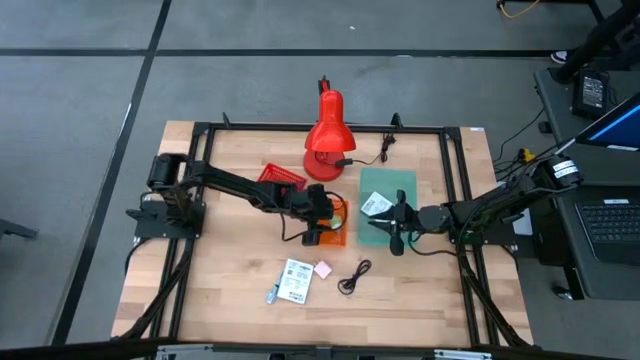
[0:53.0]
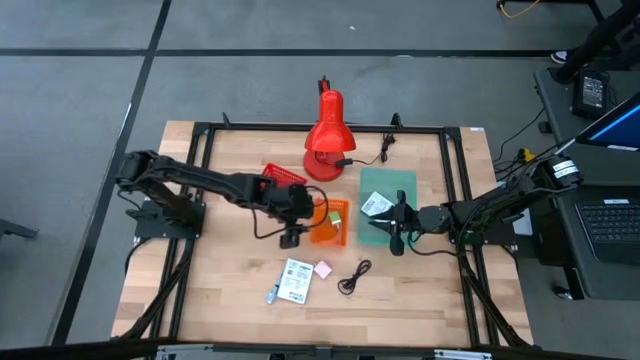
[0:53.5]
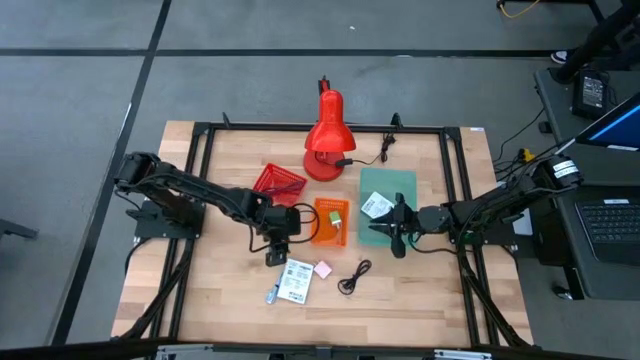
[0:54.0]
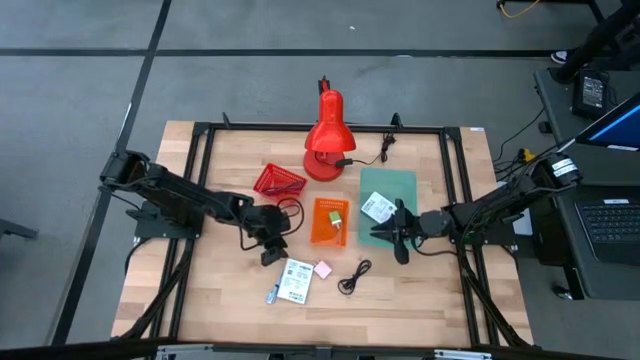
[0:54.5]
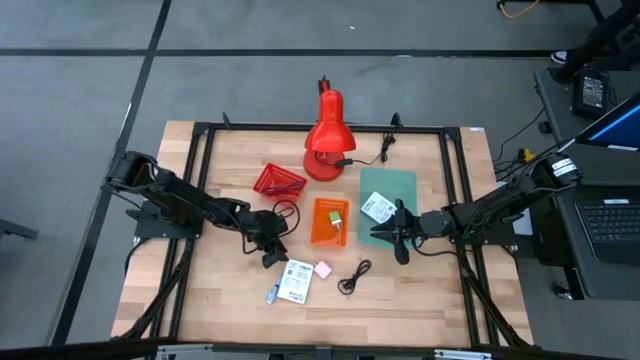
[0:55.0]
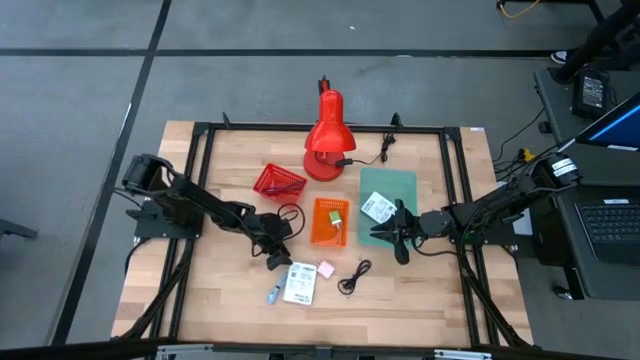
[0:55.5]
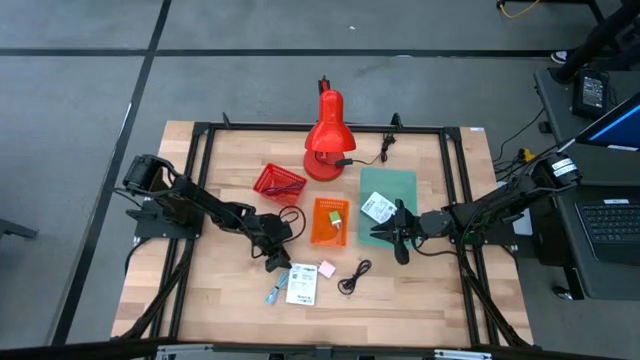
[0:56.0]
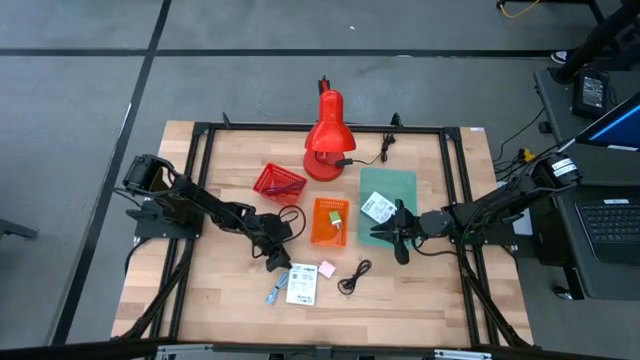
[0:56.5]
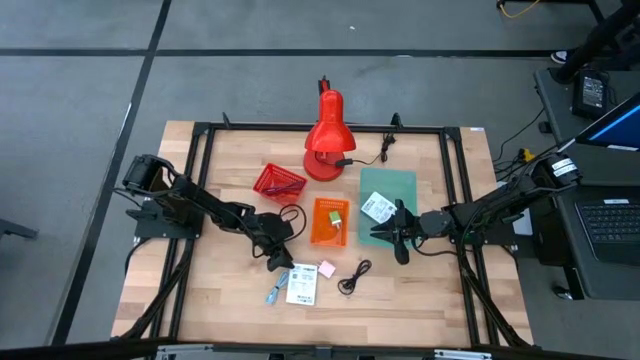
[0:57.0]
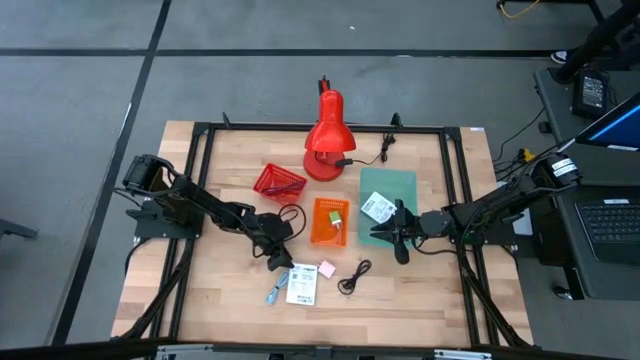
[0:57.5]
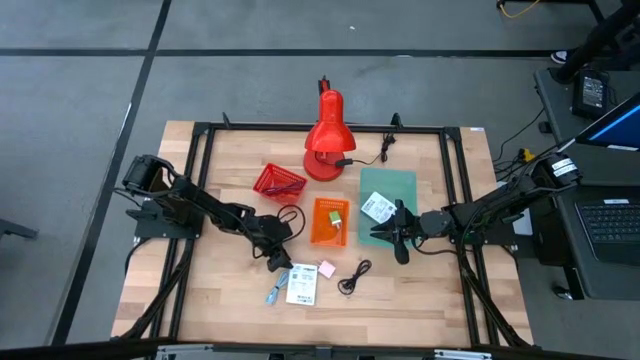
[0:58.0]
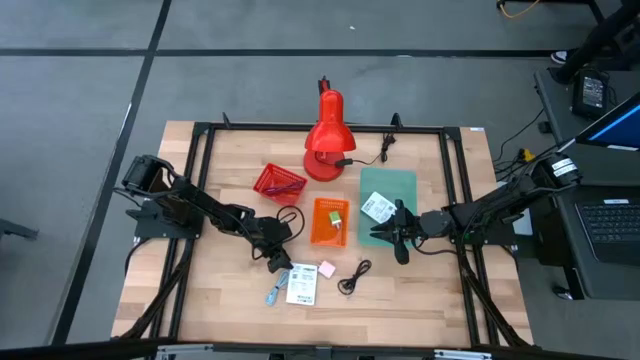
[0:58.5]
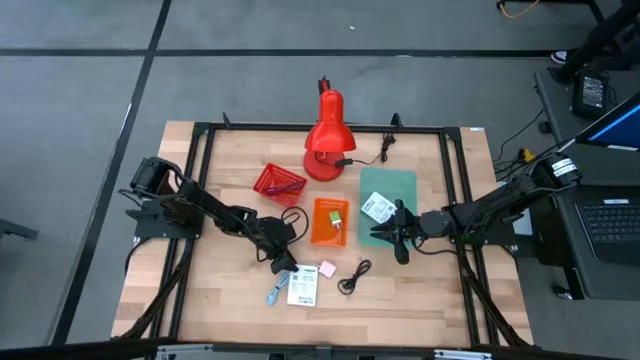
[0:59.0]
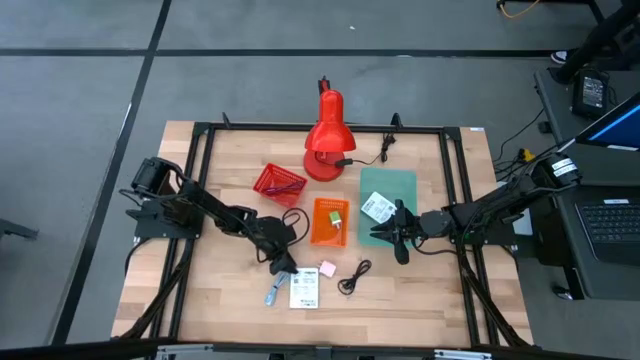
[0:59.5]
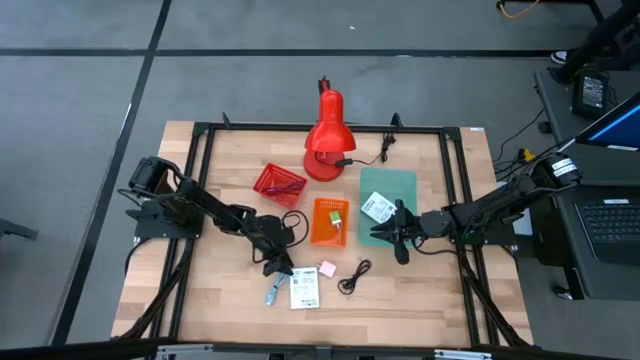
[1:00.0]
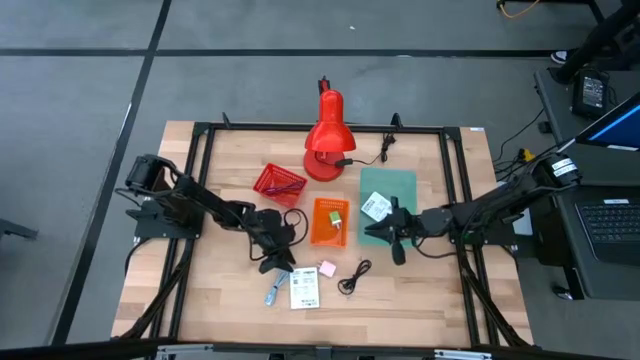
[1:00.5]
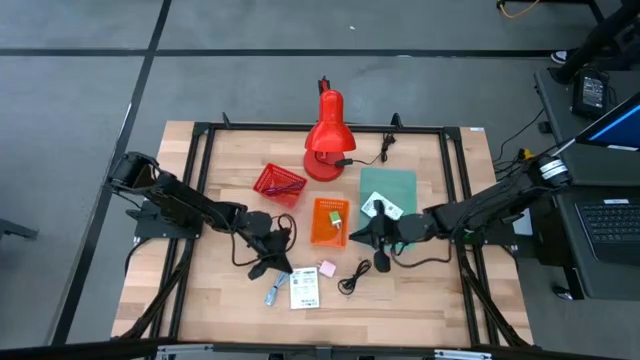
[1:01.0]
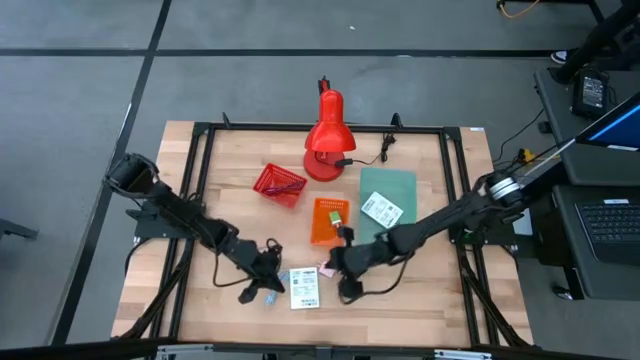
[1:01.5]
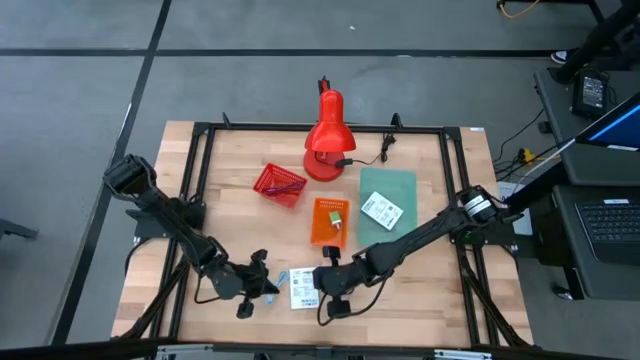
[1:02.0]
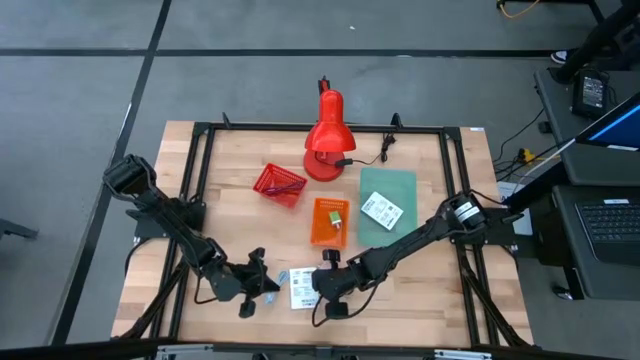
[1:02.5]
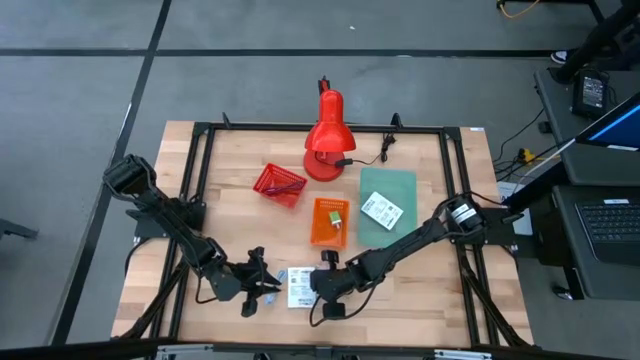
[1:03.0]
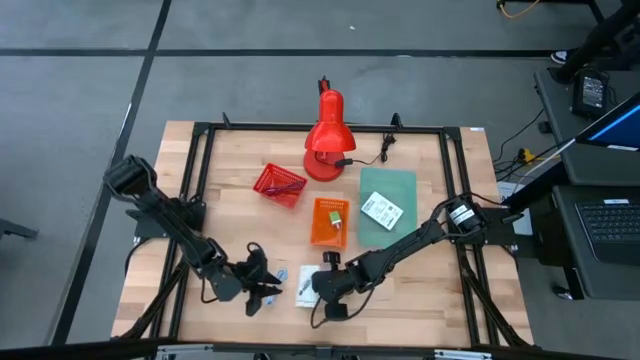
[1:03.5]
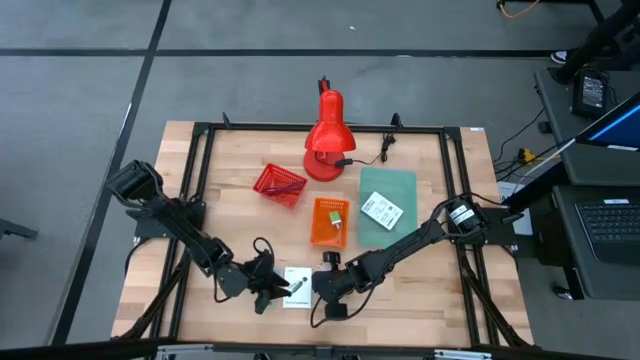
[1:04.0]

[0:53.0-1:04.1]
Task: Pick and place items into bin
Put the white card reader box into the light blue bin

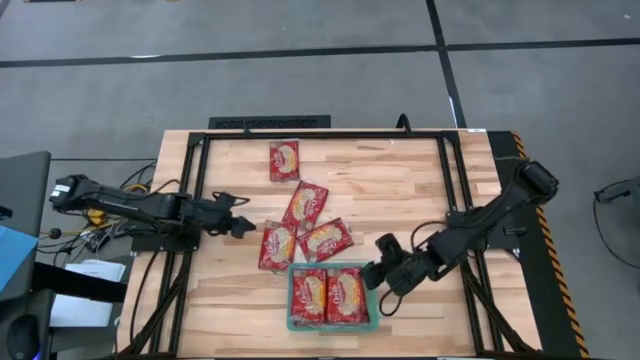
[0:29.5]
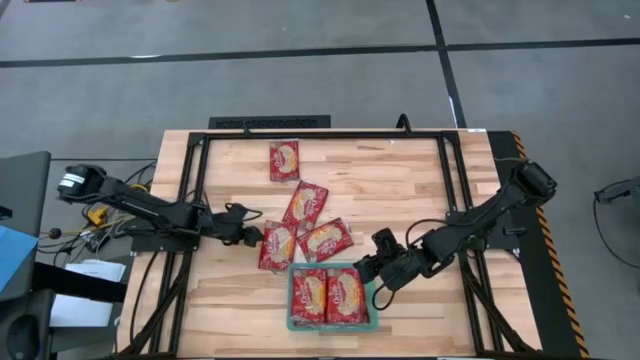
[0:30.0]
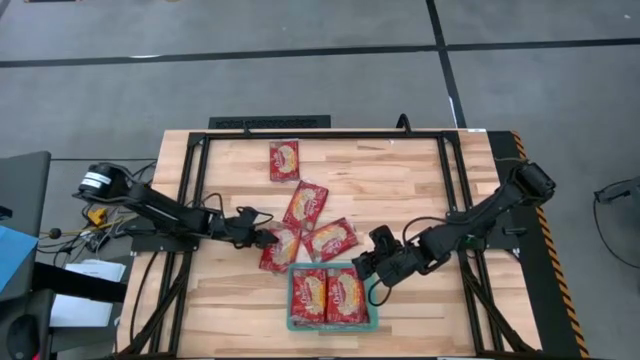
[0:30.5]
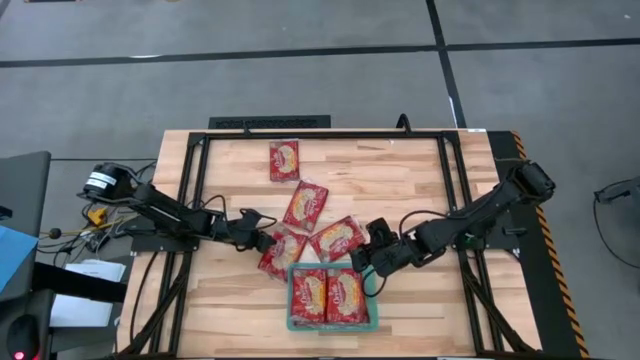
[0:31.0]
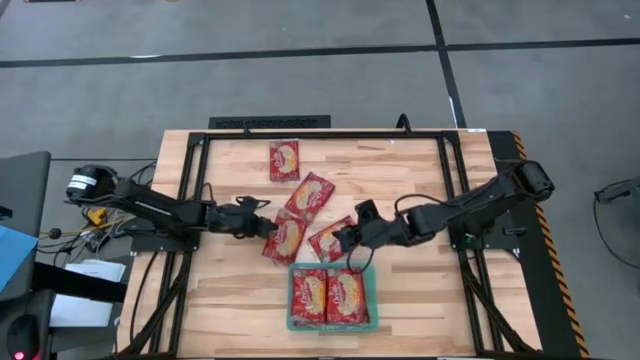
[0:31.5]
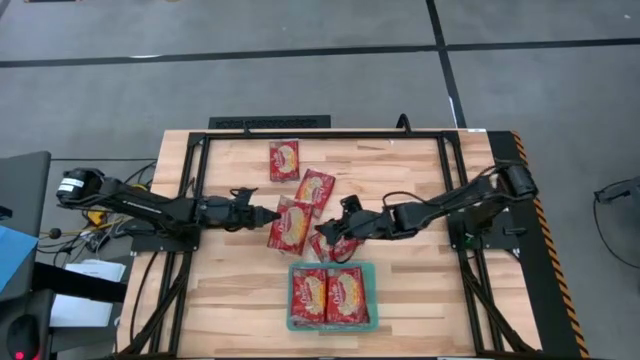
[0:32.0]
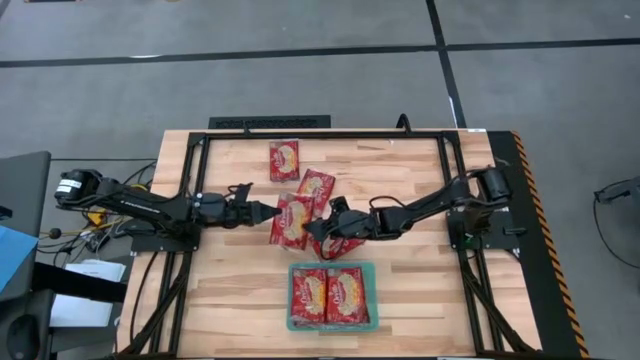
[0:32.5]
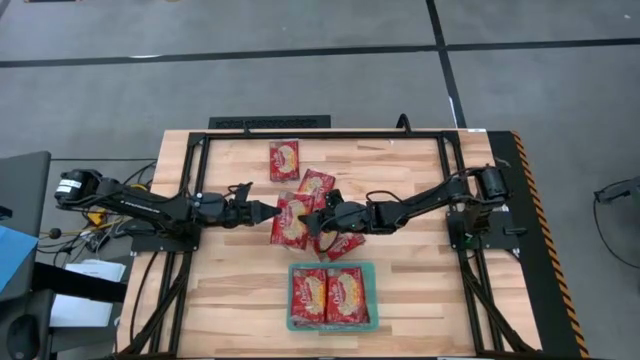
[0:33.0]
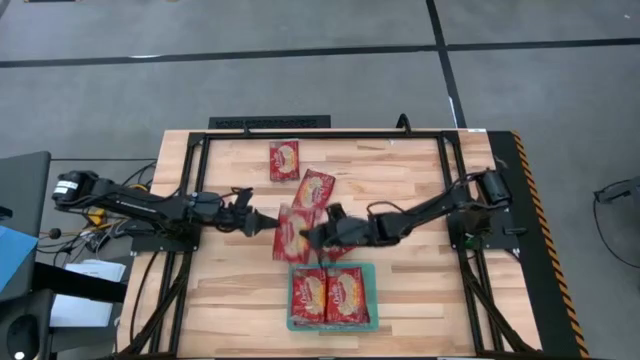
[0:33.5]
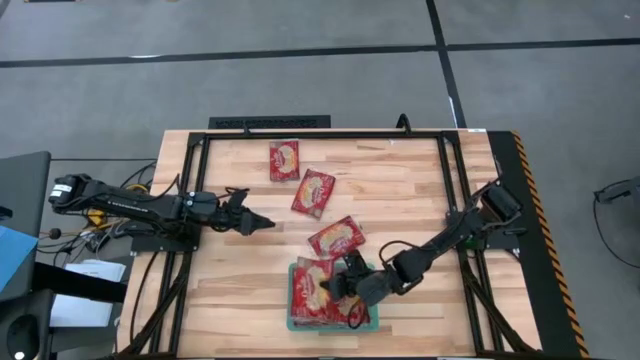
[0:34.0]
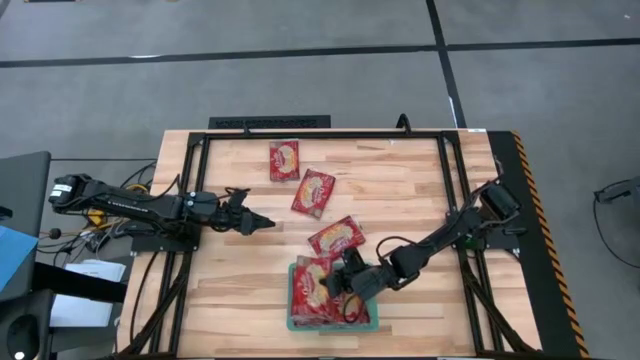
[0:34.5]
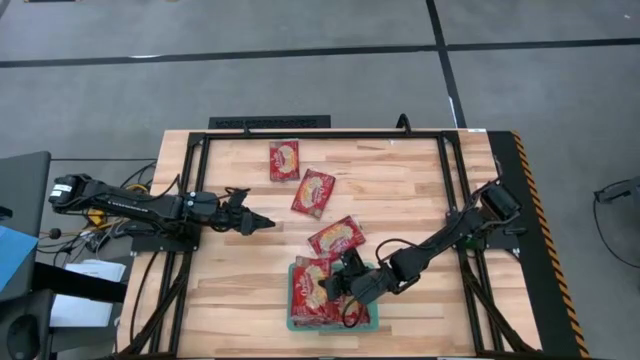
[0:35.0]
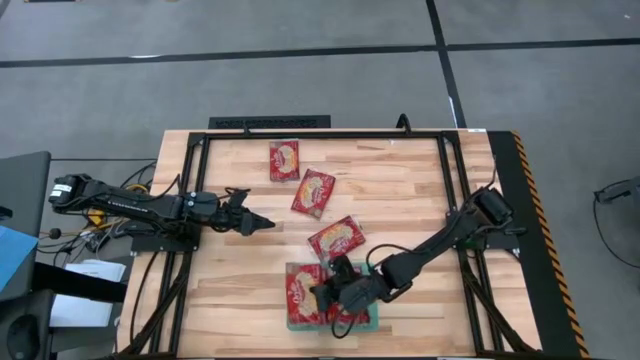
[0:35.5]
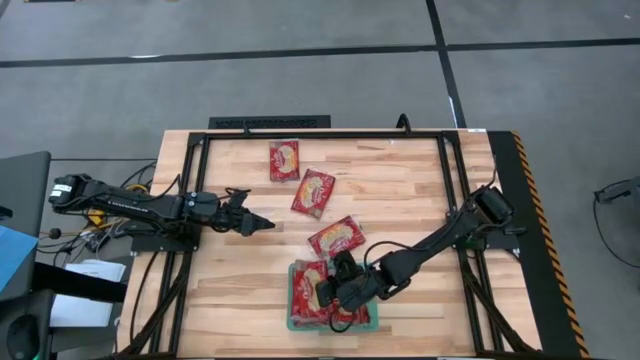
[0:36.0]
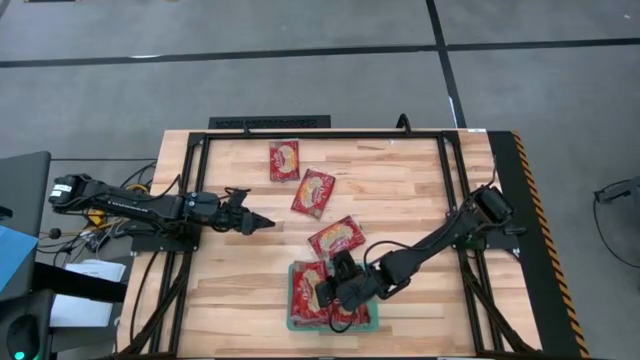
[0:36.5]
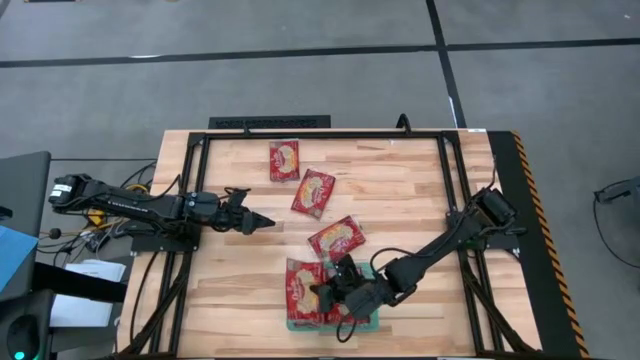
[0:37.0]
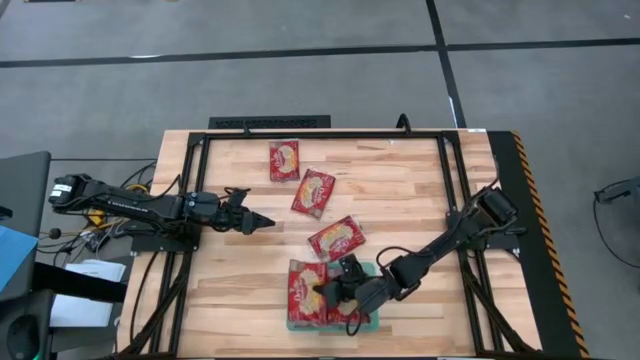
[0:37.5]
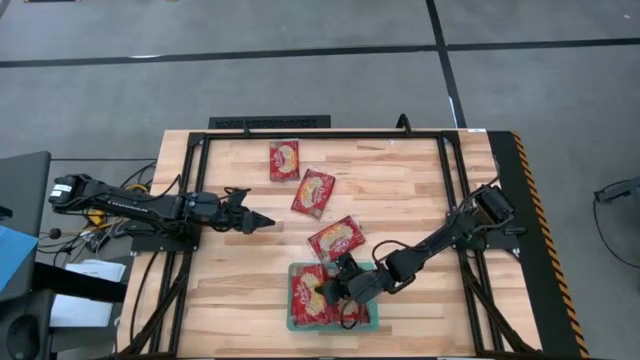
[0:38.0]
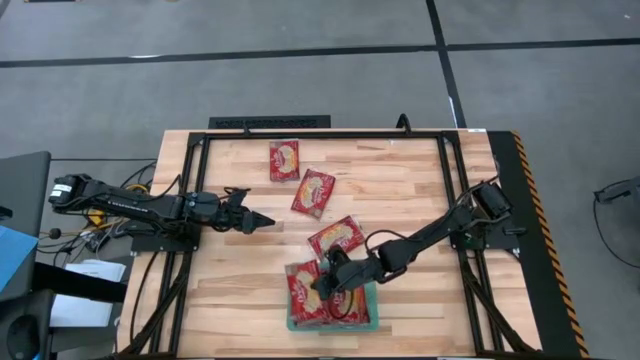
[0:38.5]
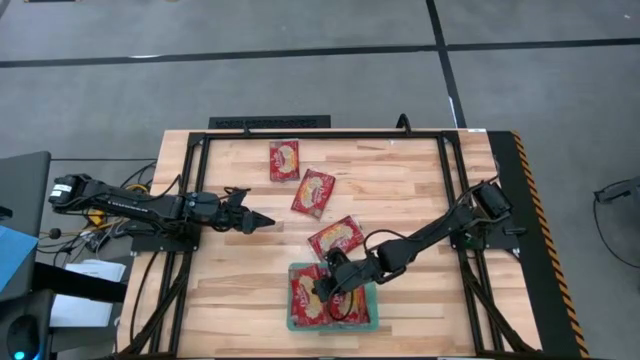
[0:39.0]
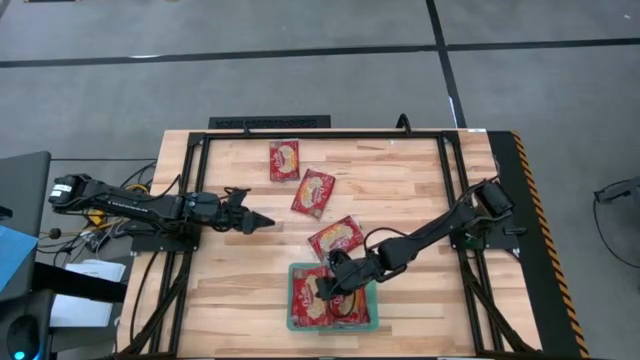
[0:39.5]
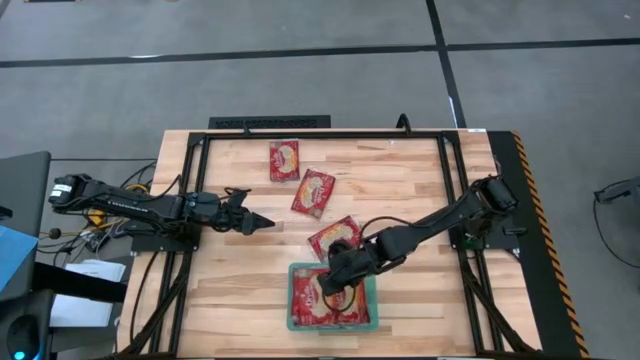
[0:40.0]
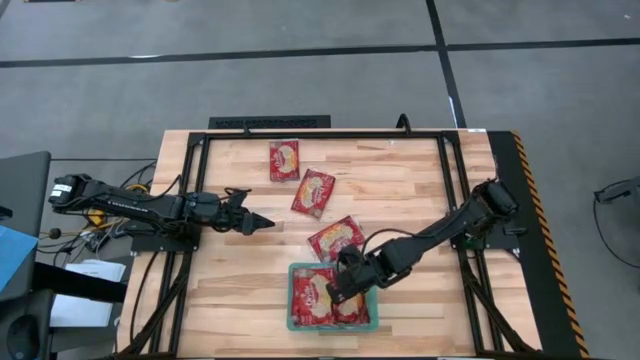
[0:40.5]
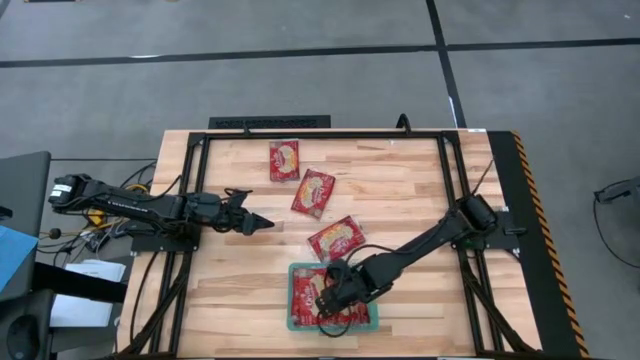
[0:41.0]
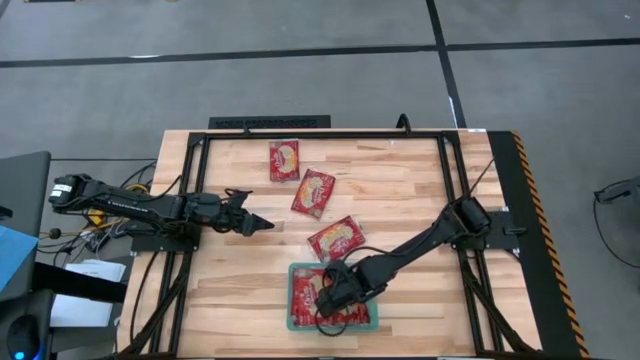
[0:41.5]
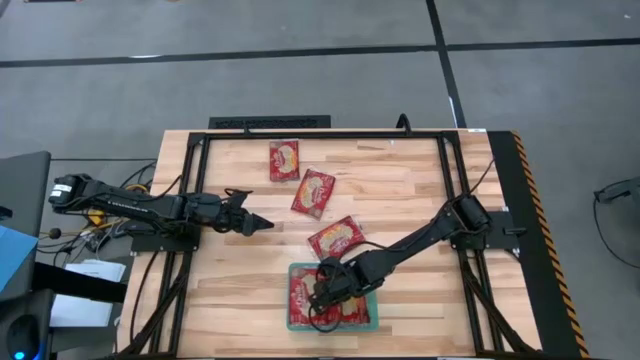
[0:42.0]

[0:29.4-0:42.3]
Task: Sort popcorn bags into baskets
Put the red popcorn bag into the green bin
